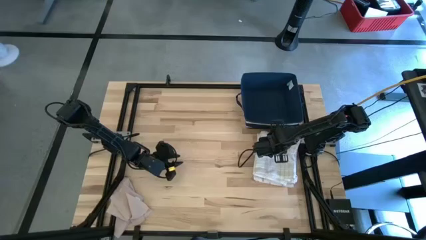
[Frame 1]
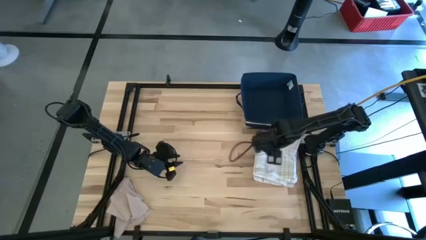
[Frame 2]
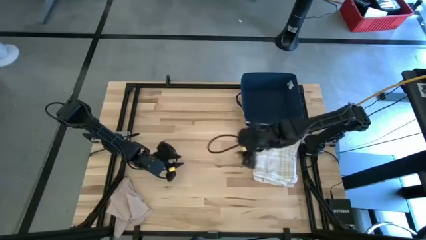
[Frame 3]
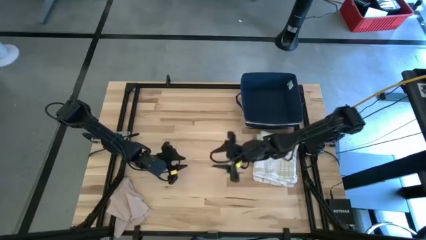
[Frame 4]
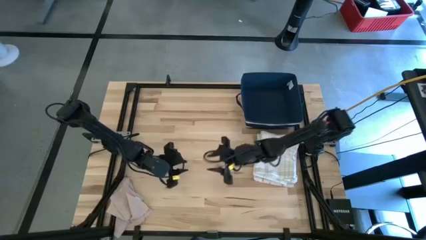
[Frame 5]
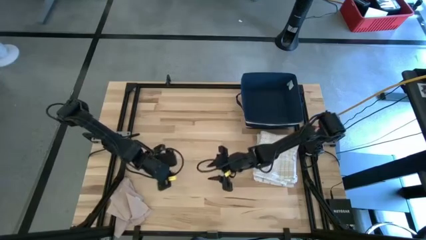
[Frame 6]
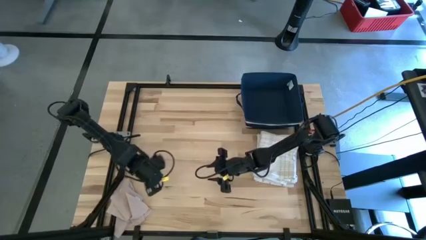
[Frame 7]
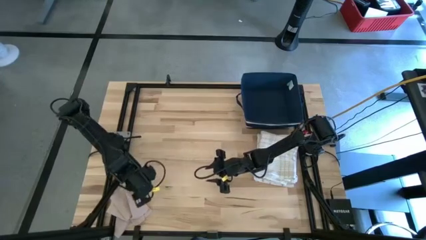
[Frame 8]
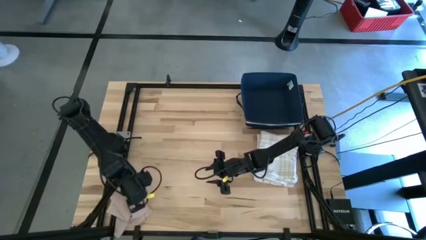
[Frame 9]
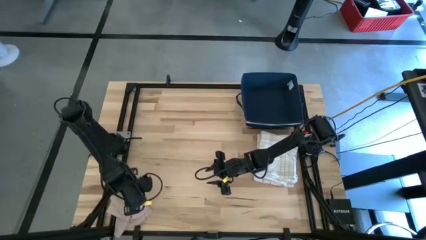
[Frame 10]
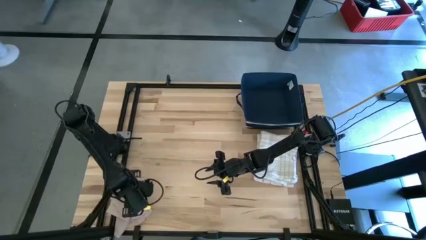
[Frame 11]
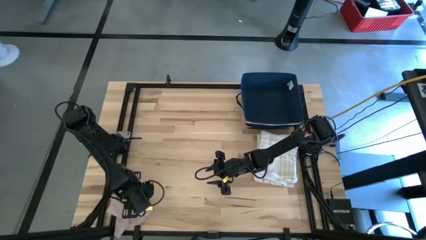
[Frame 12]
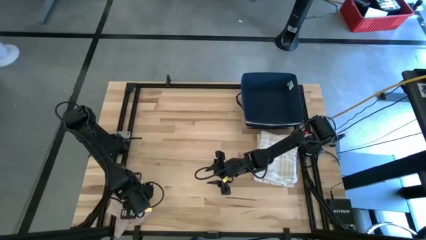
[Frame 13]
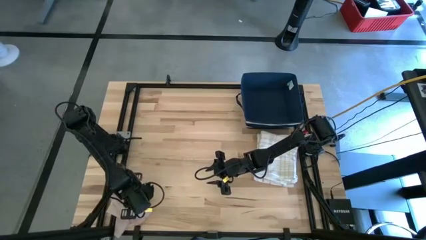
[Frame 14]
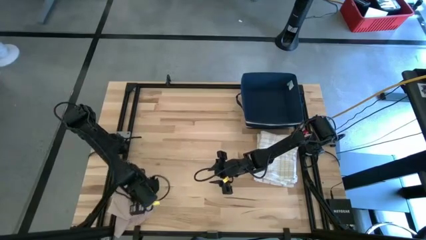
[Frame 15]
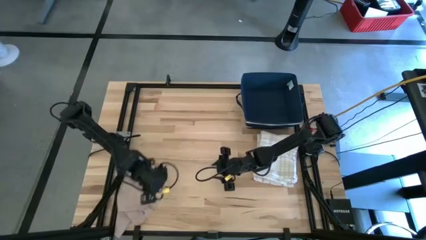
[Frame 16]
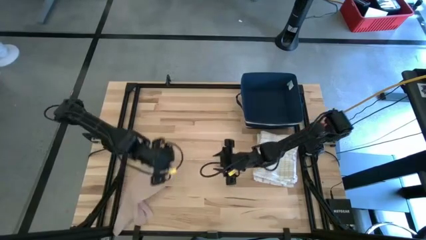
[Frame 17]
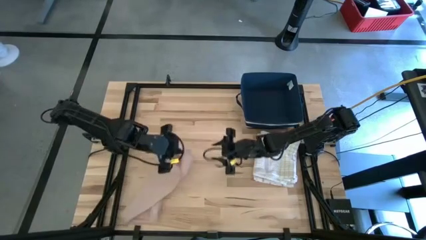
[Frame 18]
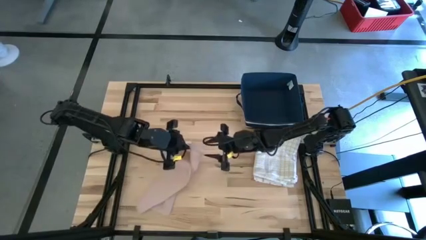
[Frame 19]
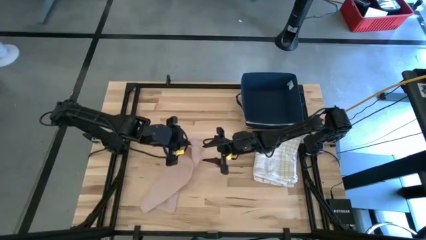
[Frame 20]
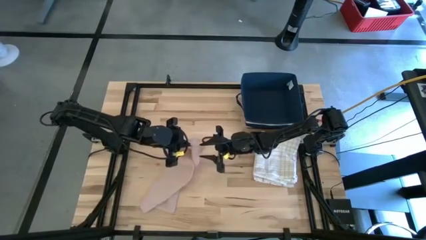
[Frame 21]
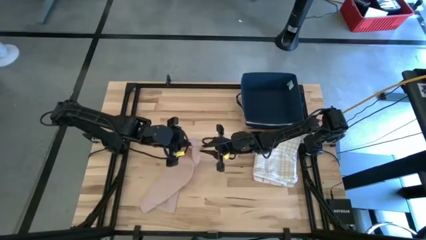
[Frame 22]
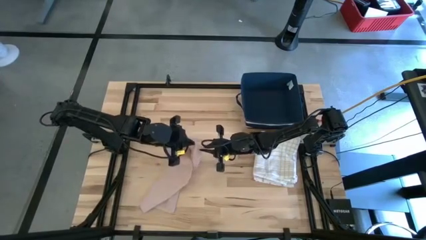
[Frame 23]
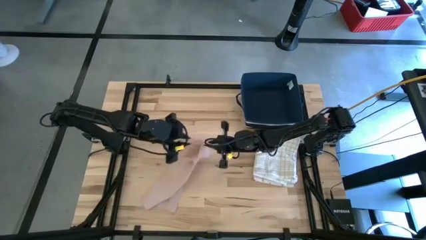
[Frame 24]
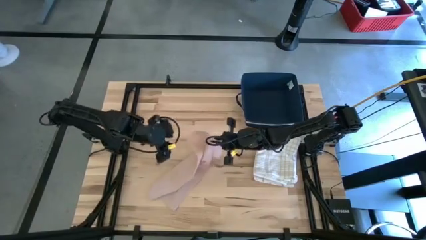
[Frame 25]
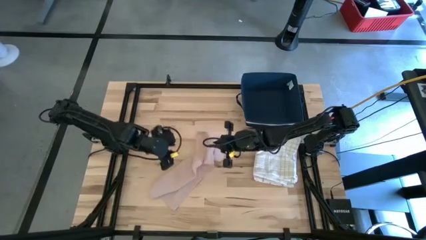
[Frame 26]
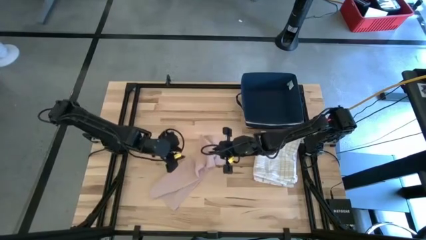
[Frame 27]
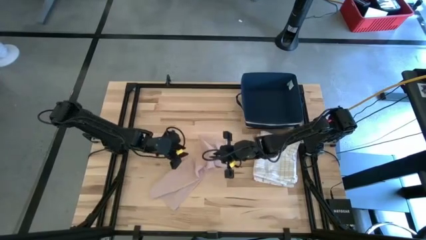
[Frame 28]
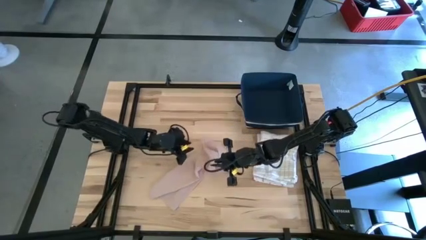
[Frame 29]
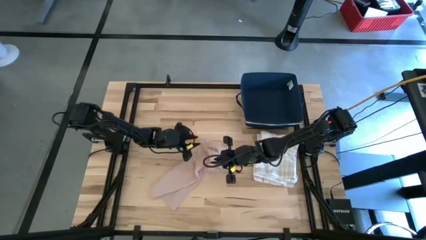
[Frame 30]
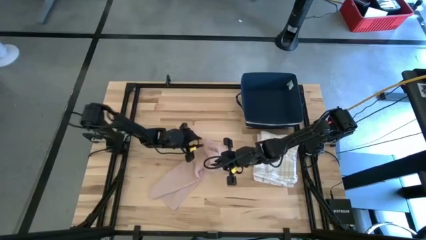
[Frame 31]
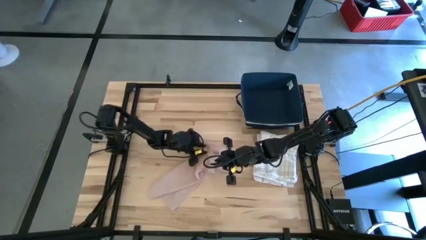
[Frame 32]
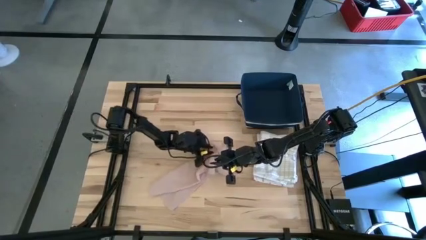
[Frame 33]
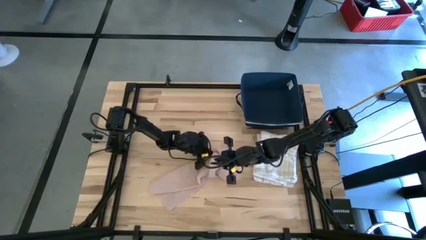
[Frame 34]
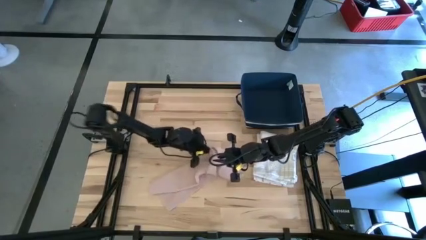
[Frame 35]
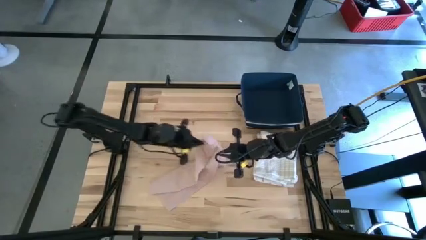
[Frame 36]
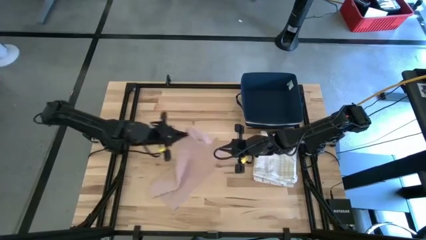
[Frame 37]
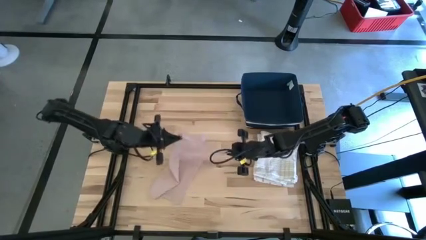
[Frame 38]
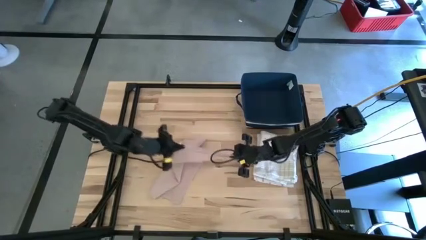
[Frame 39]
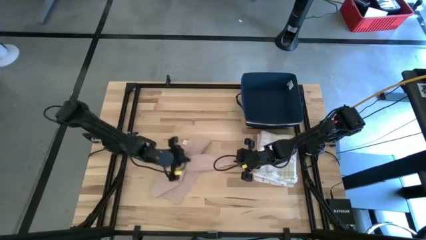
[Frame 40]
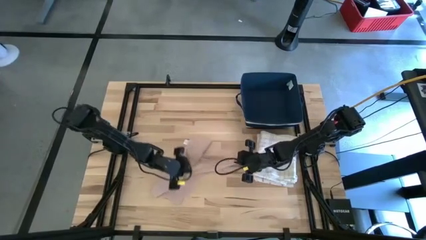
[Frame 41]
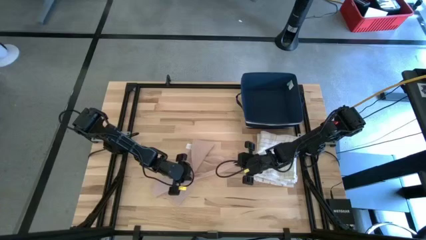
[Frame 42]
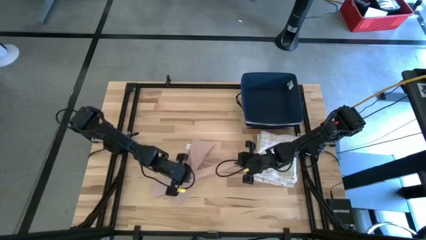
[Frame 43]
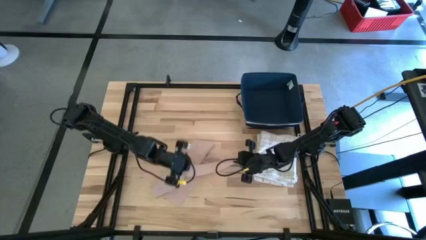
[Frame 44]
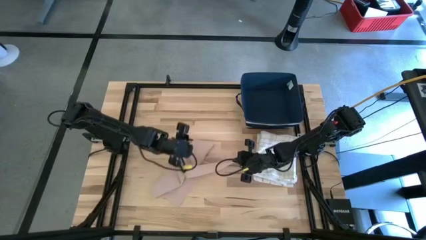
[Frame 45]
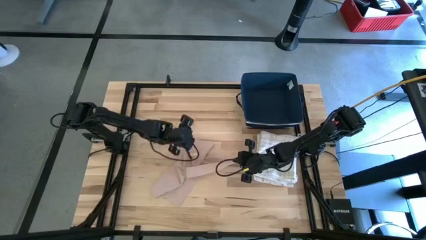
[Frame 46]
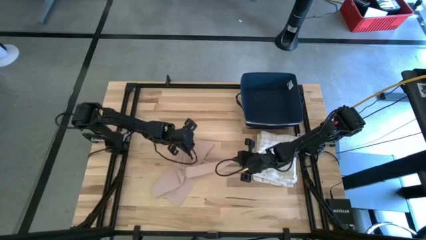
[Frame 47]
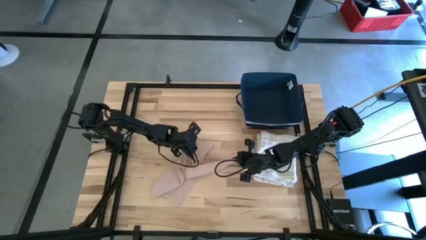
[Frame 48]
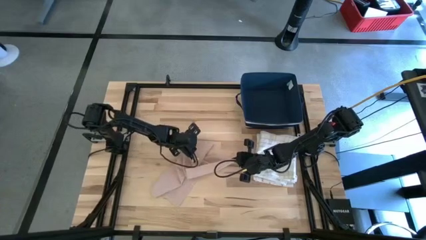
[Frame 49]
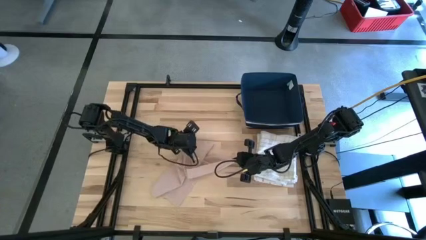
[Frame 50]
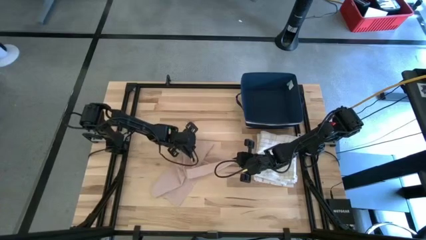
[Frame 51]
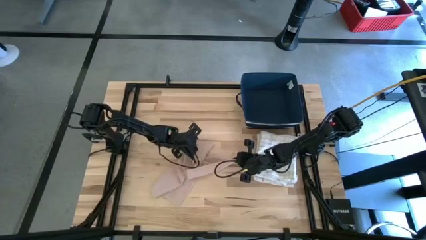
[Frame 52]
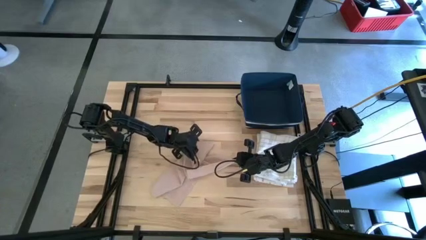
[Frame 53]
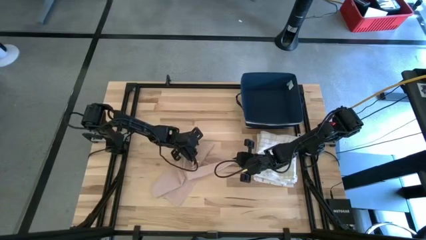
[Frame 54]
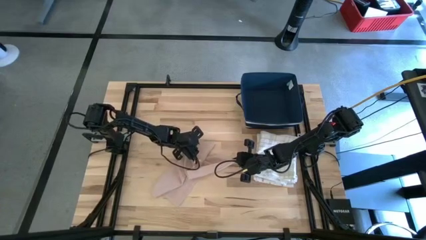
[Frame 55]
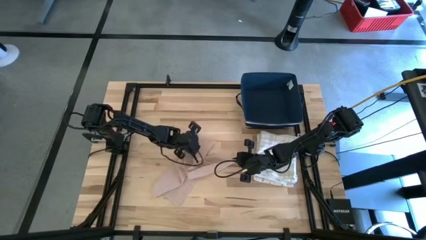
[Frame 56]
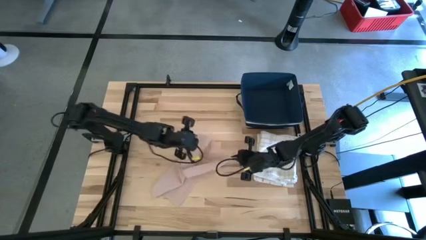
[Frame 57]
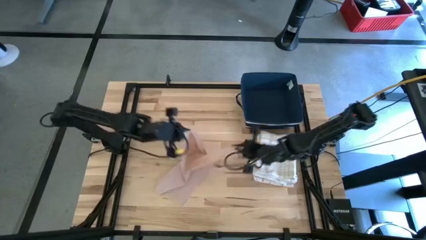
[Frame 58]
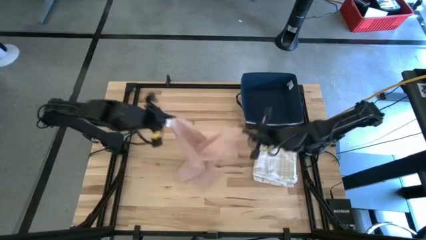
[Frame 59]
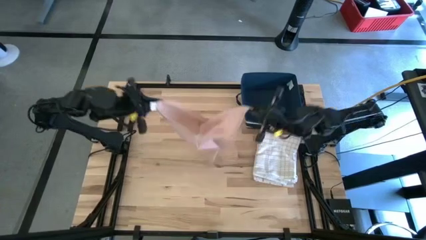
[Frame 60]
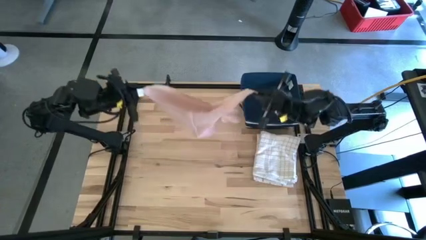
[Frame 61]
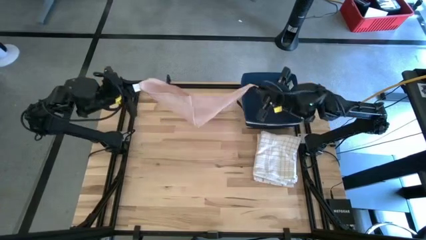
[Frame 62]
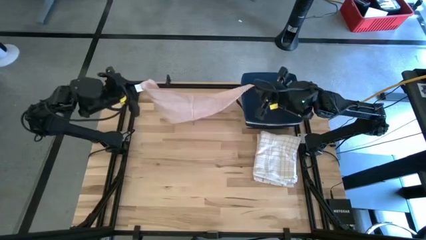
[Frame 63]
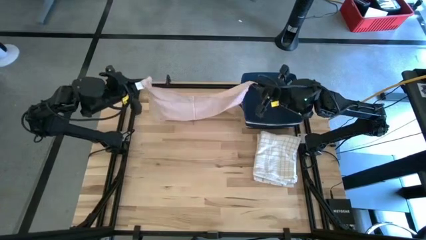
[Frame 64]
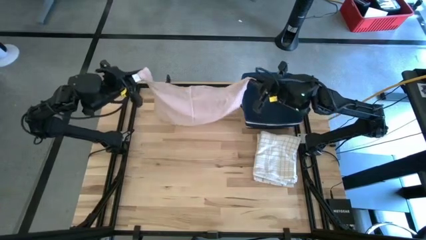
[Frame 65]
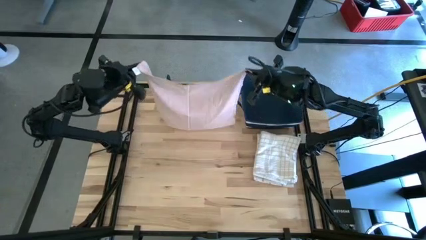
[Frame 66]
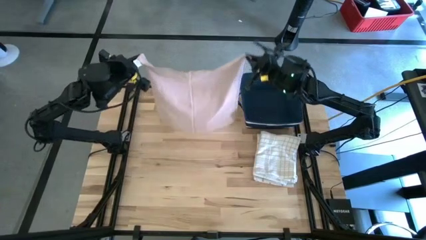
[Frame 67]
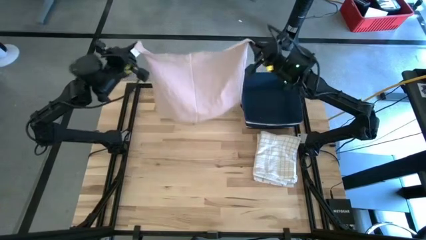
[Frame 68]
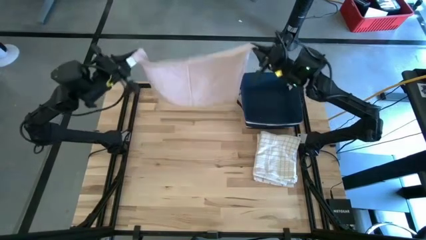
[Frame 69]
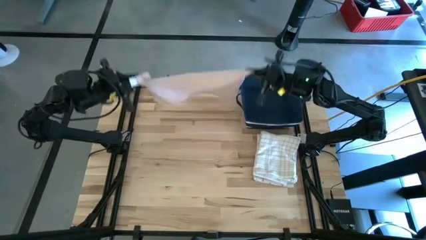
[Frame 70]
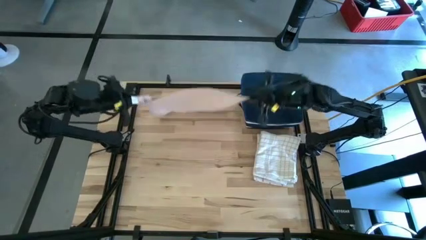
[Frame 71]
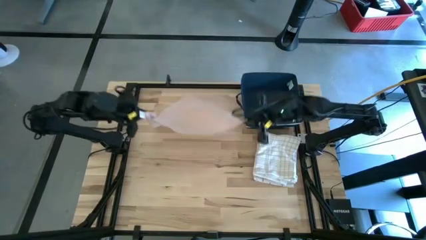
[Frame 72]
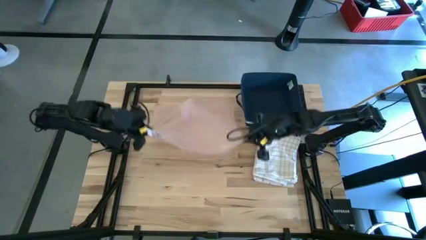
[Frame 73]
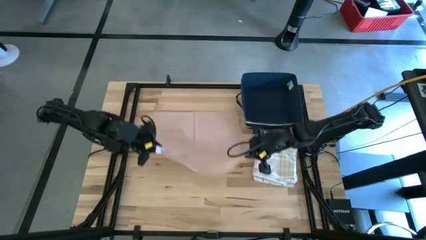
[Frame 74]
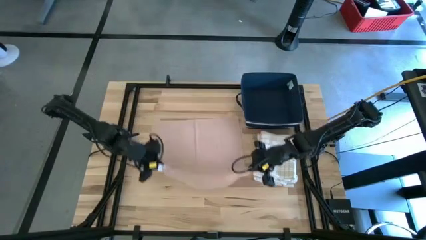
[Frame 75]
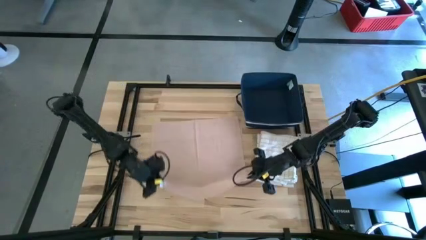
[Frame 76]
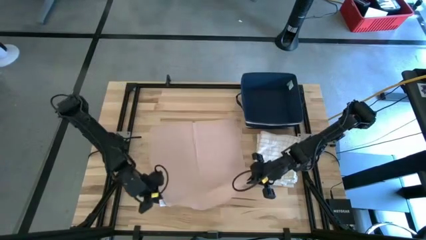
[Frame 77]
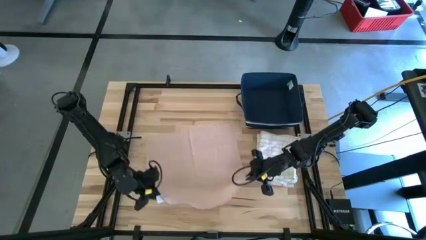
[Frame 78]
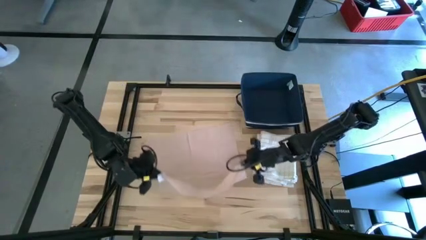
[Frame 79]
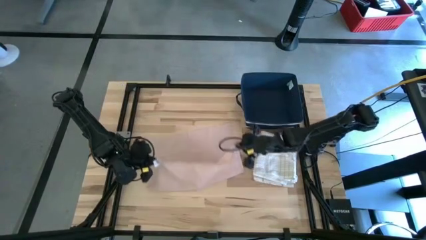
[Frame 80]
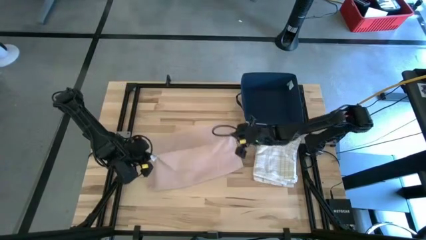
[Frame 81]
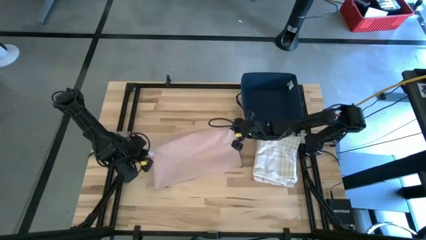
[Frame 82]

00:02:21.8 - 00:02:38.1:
Task: Fold towel
Fold the light brown towel
